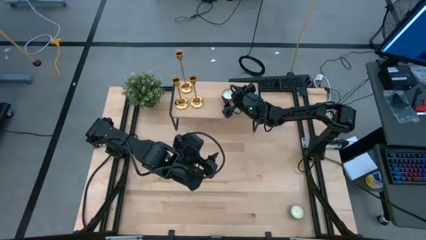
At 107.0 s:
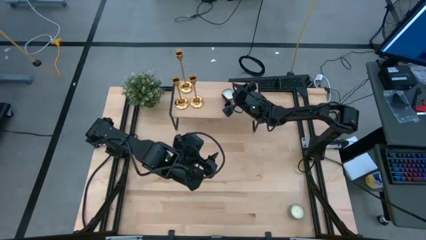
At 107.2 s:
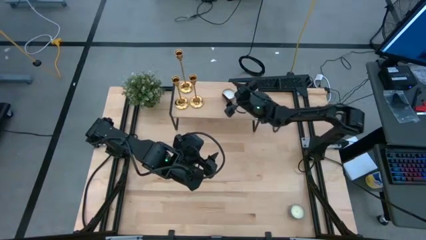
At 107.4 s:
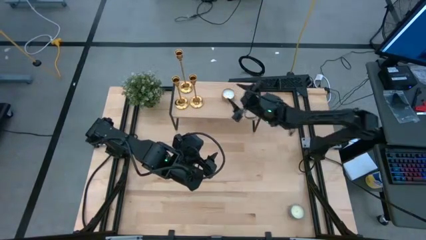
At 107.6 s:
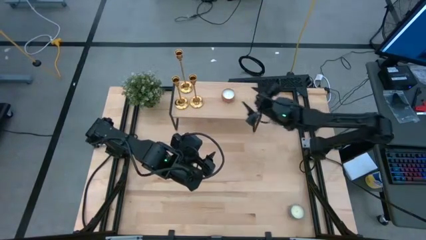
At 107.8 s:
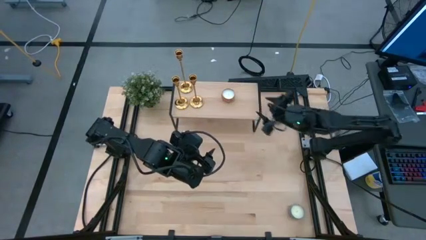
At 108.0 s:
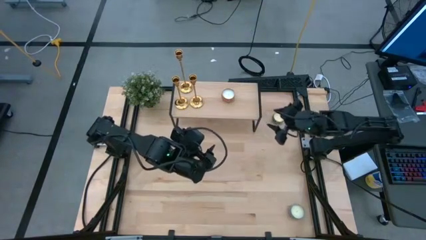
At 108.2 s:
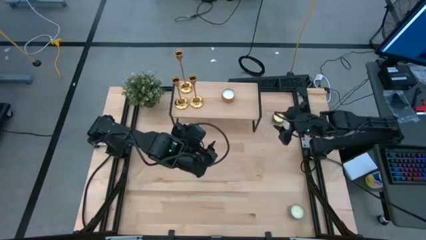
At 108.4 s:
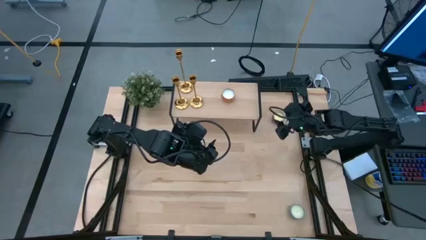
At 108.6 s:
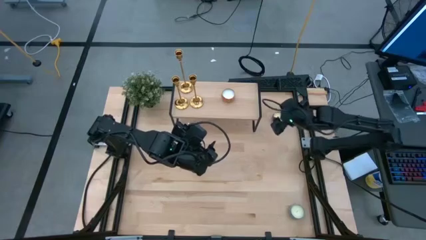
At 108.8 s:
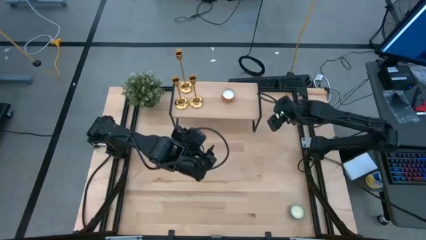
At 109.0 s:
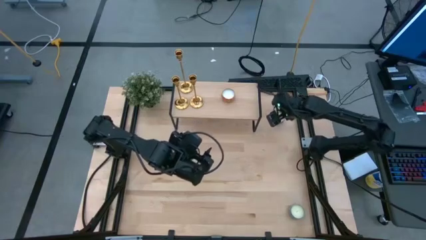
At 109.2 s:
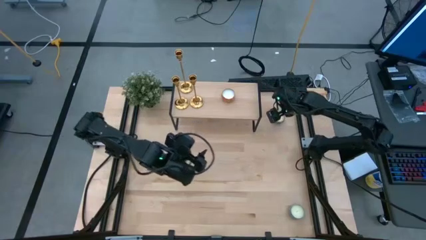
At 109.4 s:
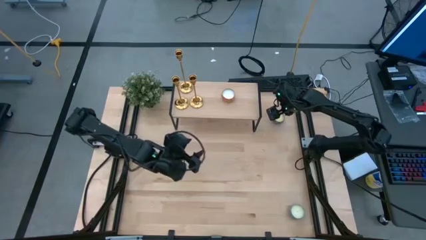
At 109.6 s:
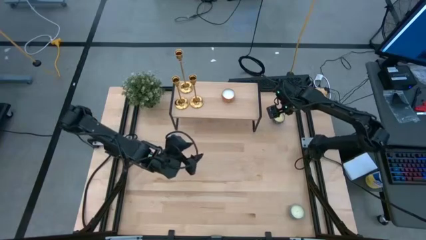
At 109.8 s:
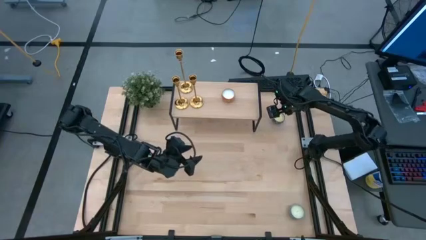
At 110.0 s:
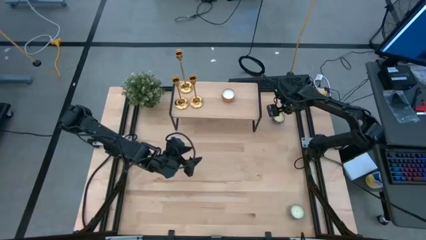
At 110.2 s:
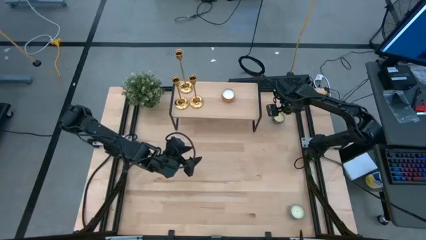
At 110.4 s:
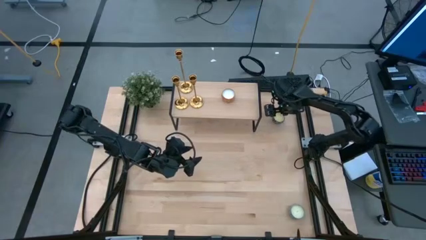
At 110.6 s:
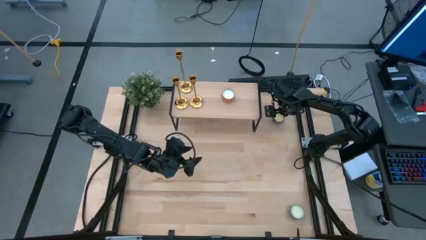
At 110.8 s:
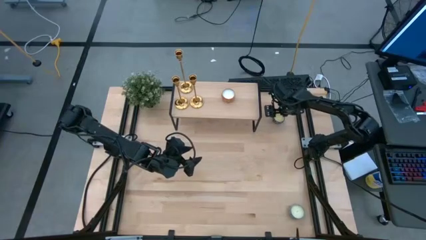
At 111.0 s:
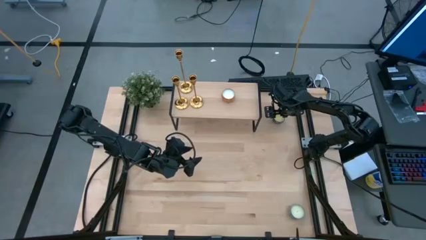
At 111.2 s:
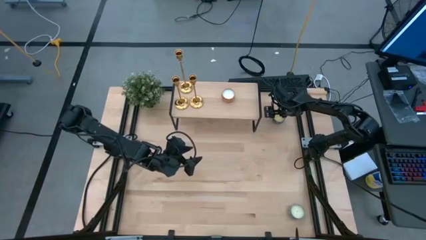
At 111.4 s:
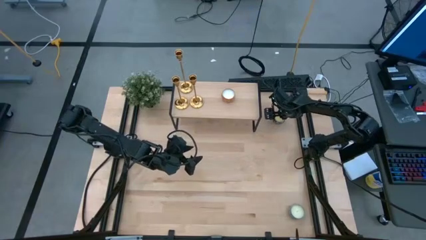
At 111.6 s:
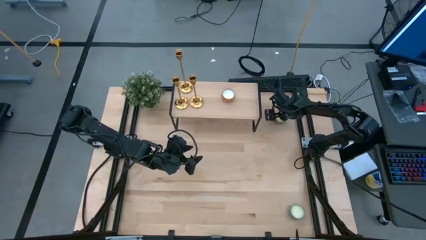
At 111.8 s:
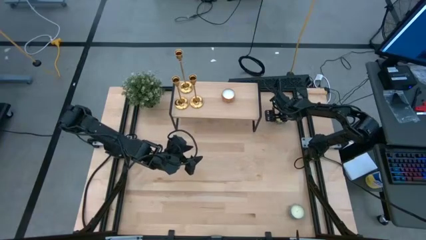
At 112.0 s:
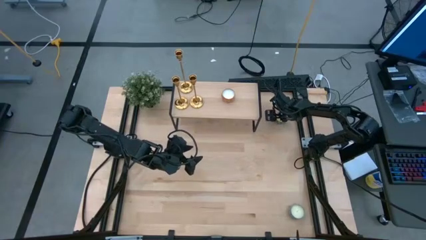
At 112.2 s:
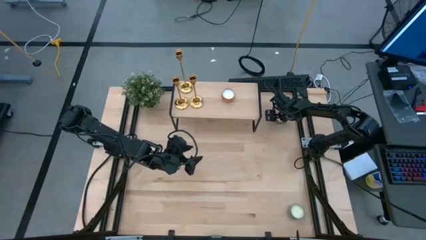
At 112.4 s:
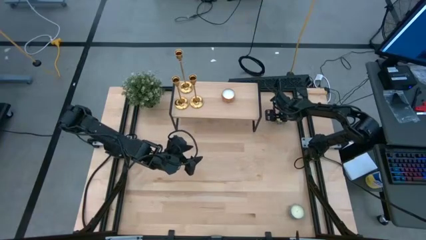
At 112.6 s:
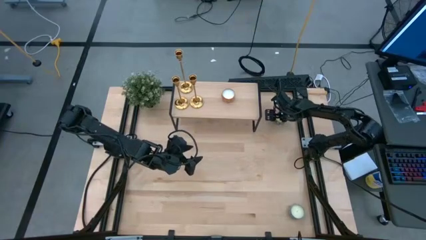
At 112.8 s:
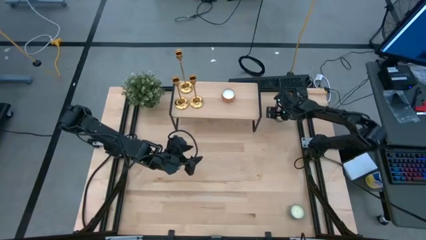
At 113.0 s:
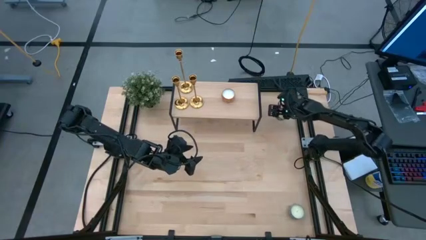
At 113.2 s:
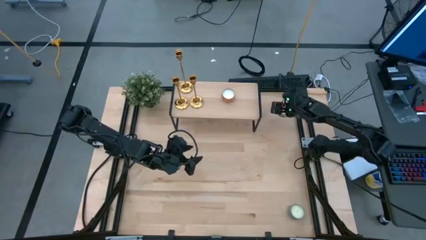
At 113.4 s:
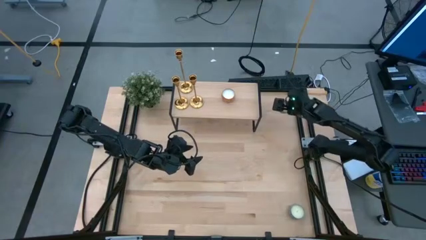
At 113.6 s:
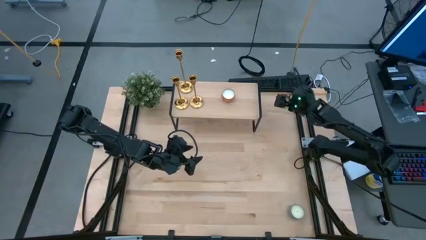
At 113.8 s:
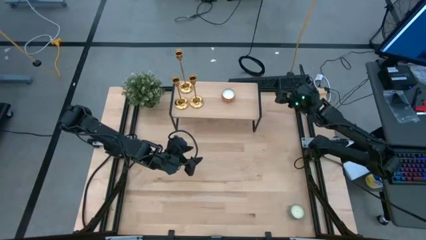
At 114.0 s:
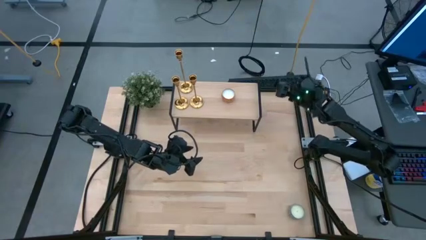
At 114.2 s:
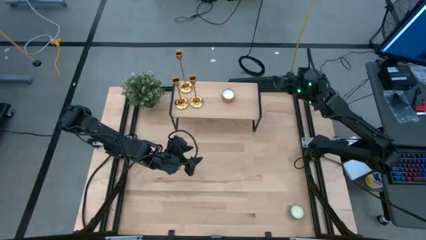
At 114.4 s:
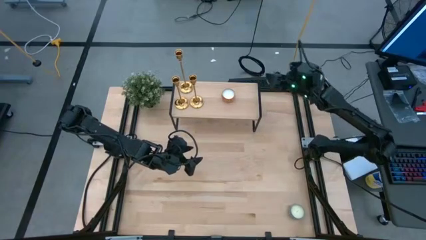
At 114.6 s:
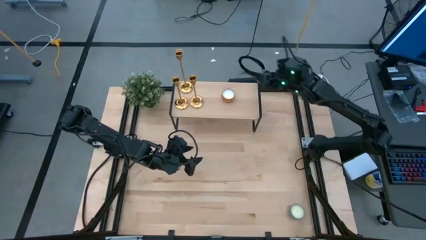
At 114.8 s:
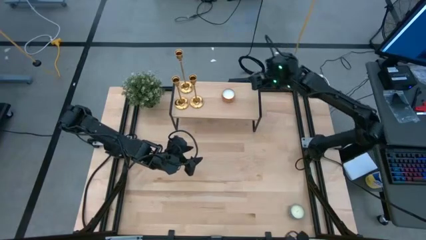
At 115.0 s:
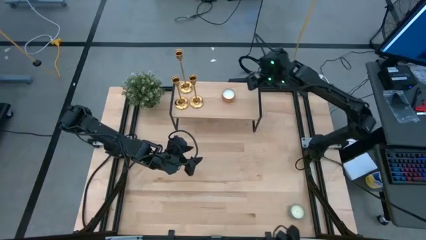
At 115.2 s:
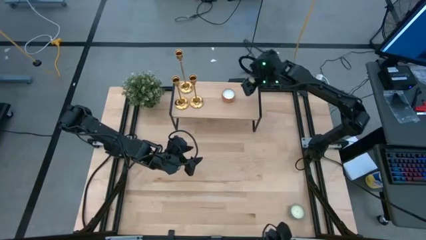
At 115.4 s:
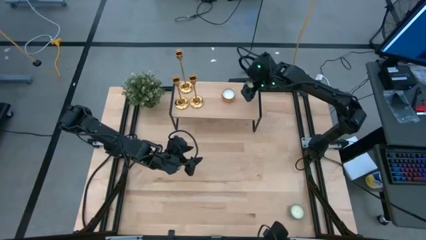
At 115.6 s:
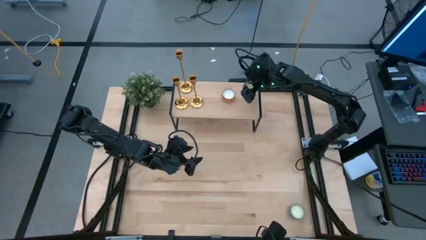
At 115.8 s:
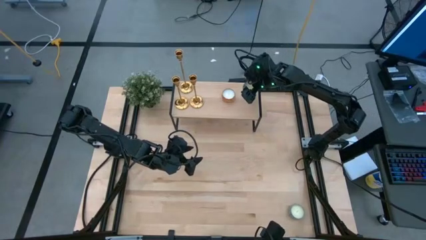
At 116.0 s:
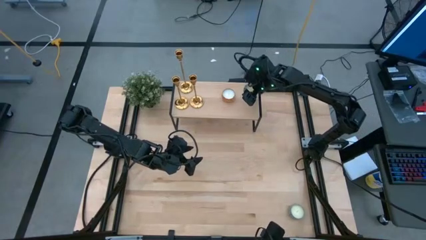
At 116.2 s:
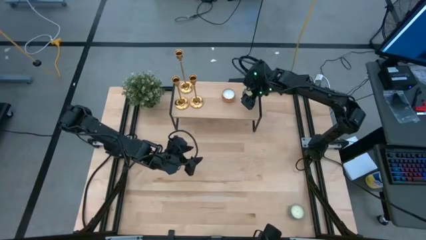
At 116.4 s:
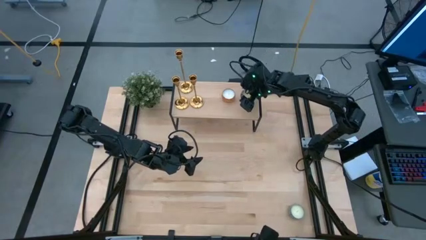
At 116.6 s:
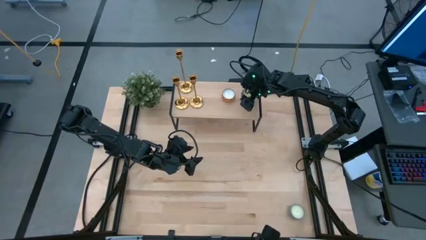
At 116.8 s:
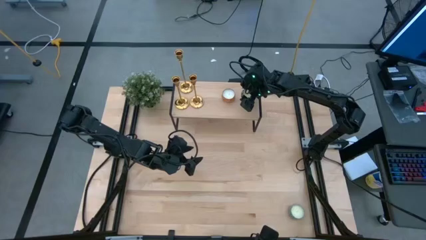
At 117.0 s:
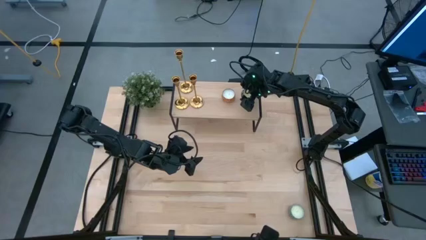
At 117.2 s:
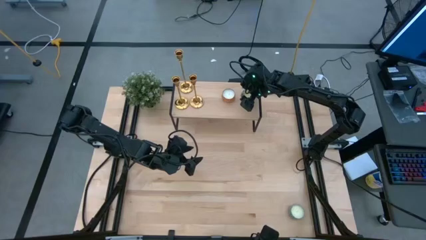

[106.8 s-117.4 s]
Task: Pick & Place candle stick holders
Put the red patterned scented candle on the shelf

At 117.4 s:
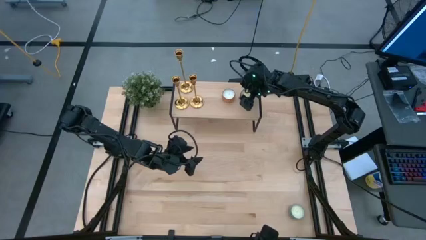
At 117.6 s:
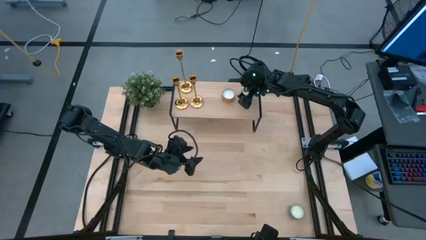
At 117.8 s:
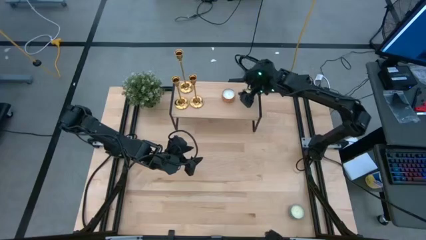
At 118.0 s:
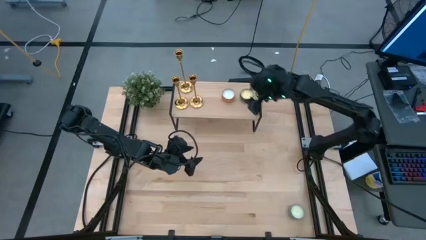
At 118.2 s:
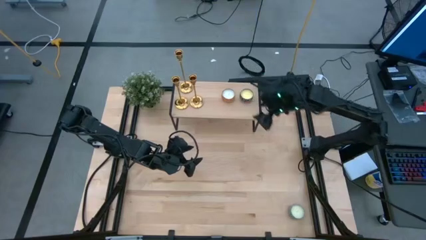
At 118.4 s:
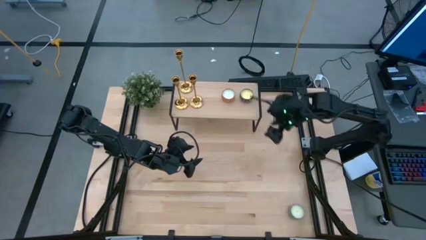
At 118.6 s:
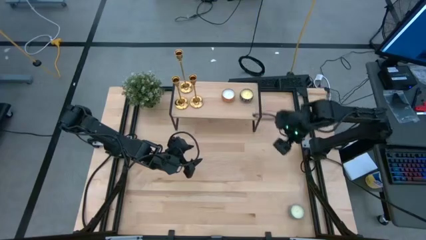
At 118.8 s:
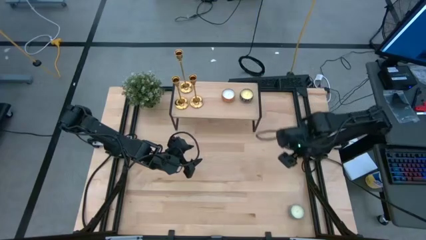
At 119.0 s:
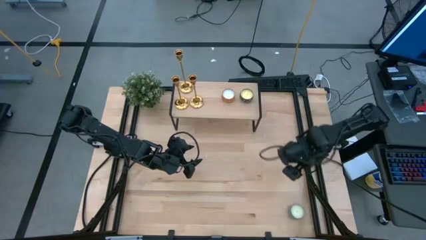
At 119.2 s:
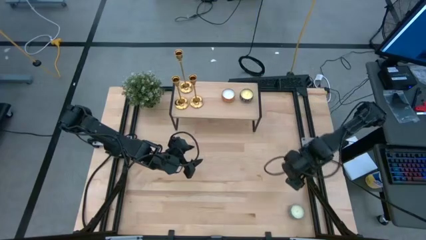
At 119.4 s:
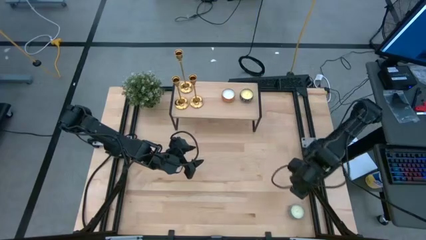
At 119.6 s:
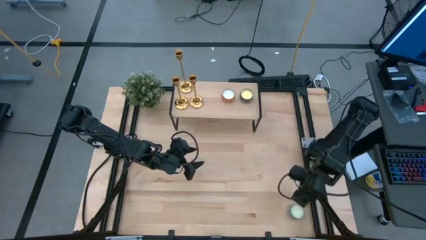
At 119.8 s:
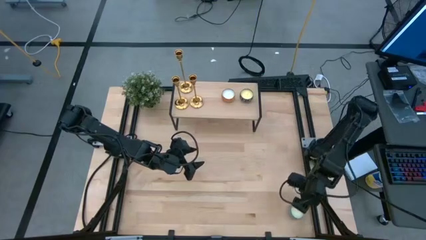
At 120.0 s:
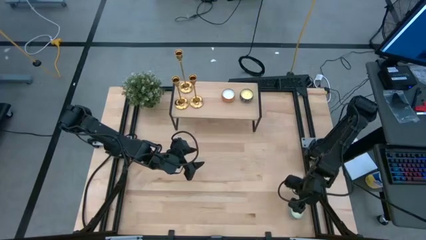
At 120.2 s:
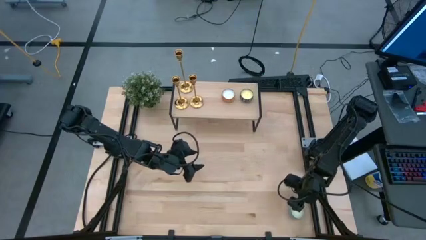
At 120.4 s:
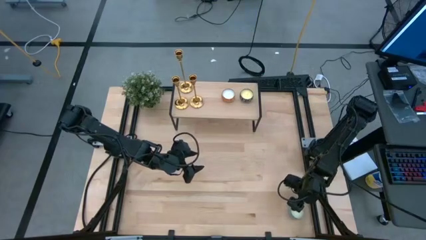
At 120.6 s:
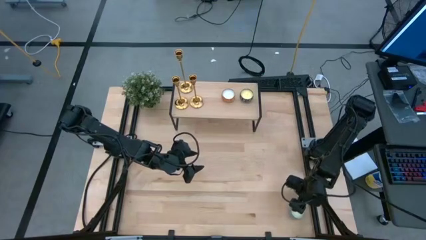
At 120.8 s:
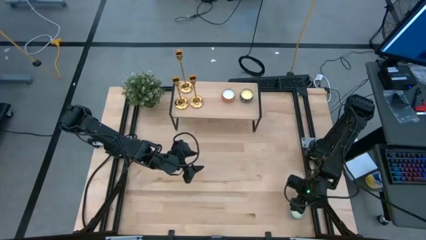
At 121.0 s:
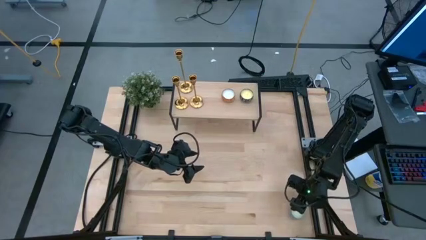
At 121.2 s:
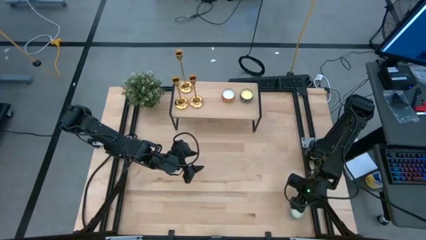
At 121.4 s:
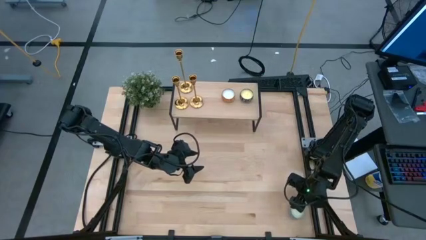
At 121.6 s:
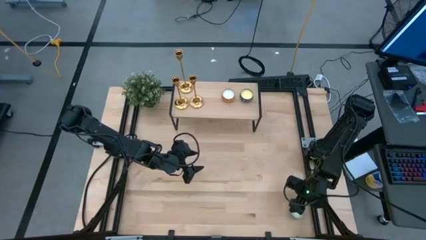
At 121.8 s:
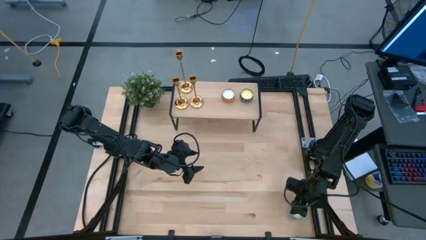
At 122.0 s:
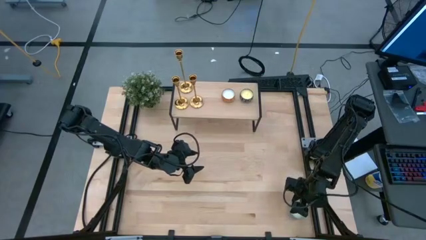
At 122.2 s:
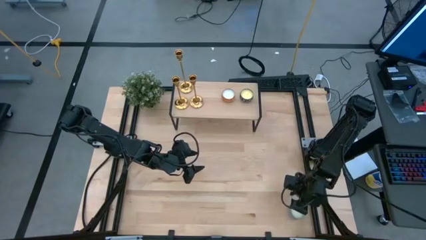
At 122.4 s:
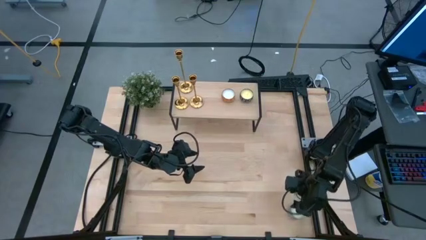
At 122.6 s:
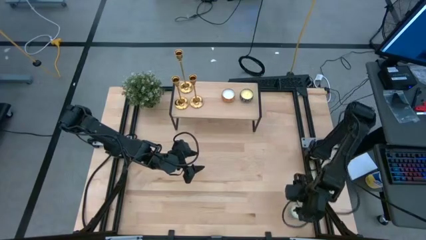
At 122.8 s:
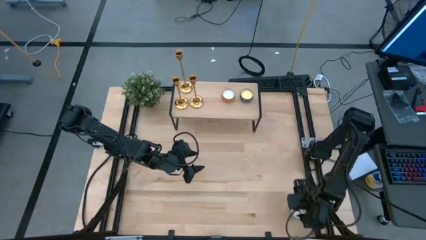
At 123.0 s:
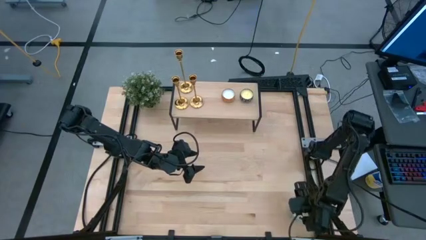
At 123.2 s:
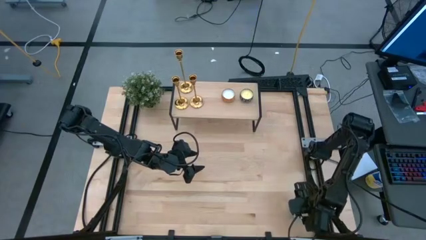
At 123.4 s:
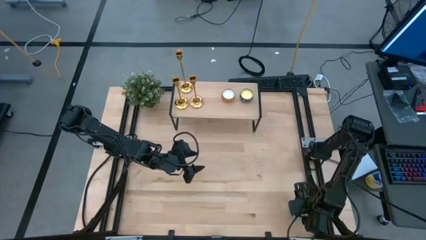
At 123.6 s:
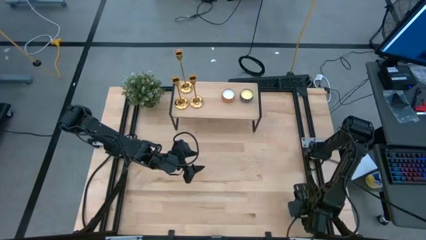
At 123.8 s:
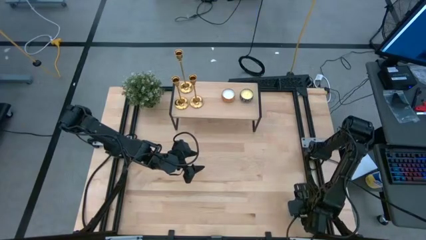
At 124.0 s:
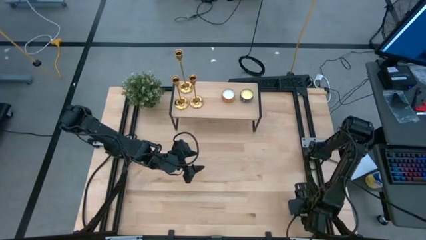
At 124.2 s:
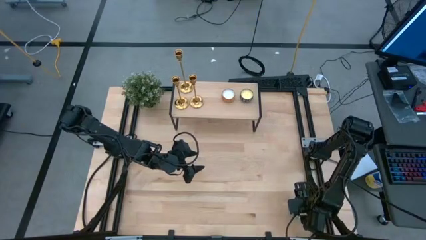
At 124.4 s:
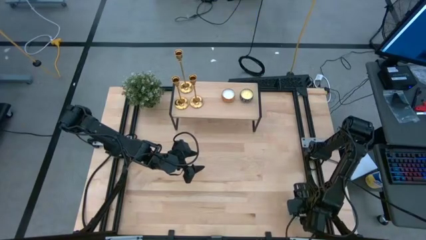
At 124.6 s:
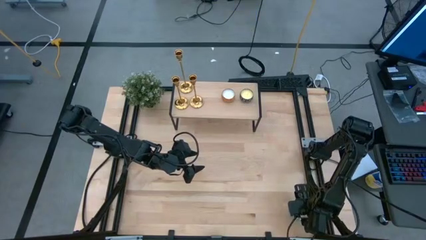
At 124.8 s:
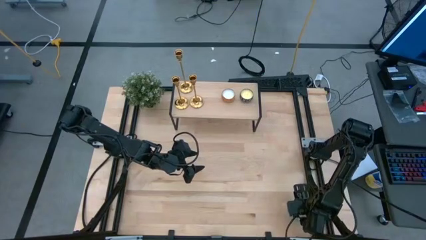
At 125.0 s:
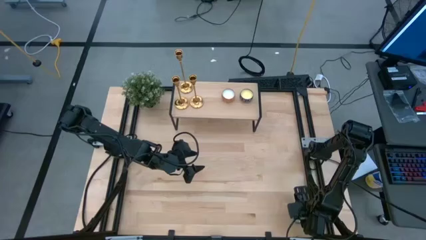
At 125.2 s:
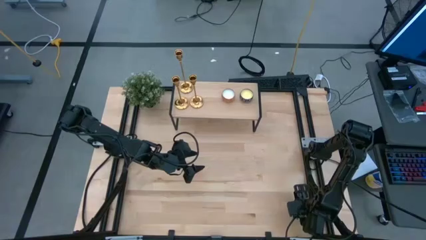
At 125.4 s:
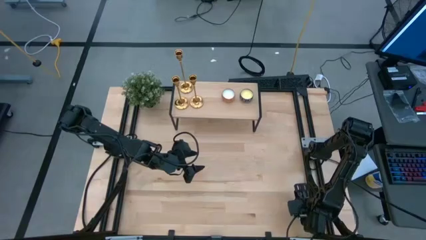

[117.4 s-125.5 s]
Put the blue patterned scented candle on the shelf
